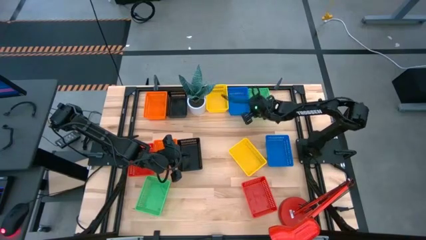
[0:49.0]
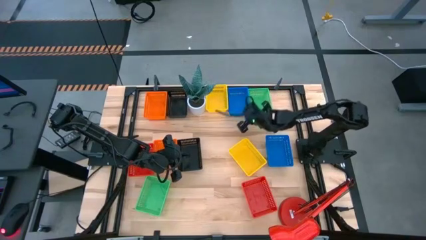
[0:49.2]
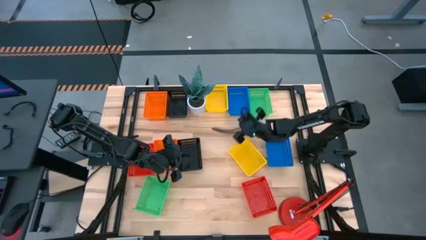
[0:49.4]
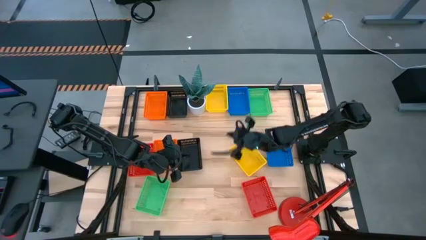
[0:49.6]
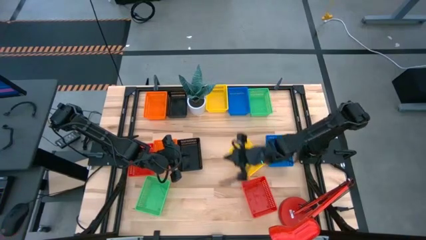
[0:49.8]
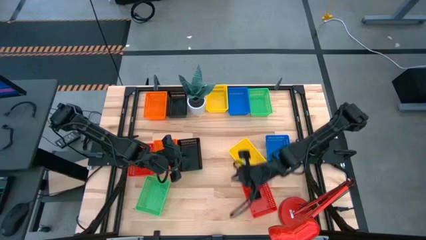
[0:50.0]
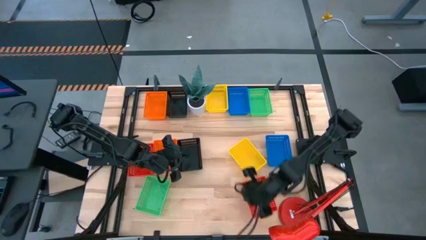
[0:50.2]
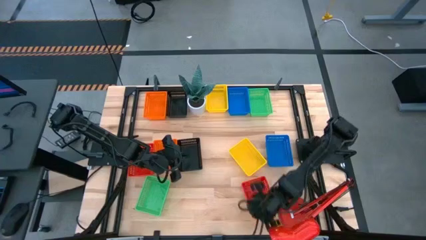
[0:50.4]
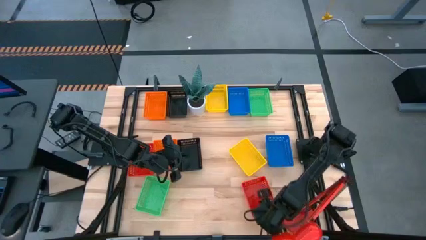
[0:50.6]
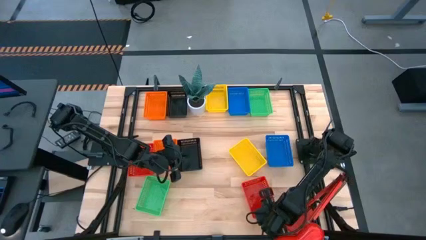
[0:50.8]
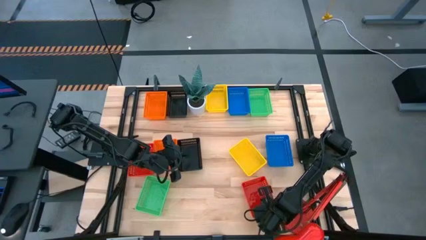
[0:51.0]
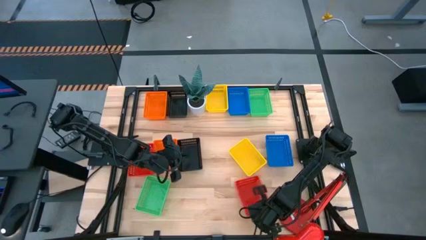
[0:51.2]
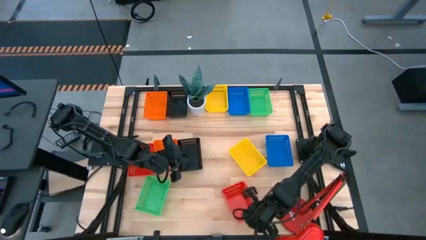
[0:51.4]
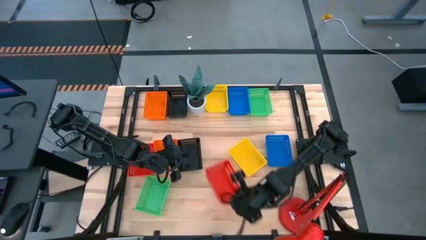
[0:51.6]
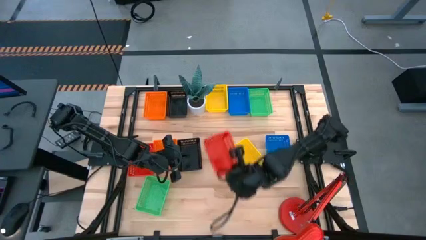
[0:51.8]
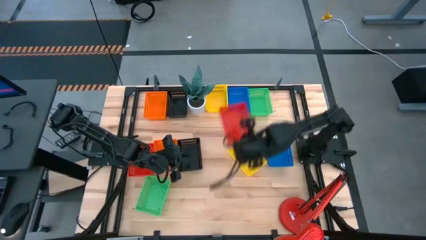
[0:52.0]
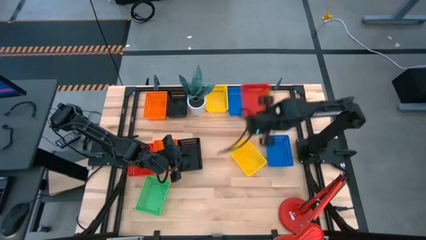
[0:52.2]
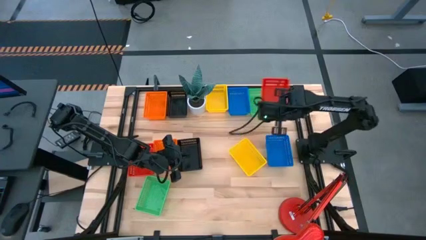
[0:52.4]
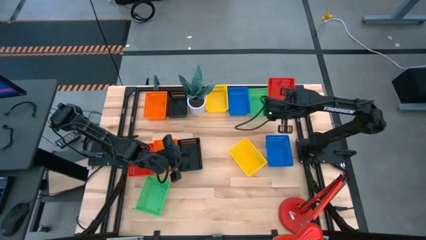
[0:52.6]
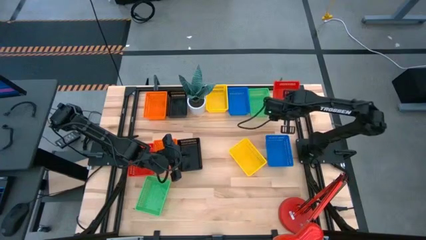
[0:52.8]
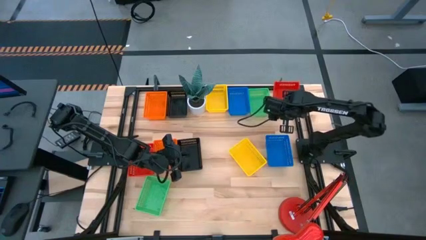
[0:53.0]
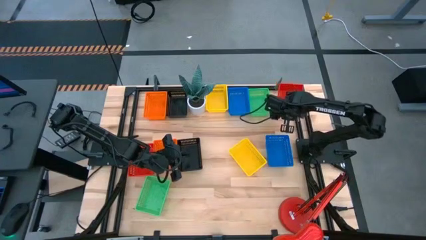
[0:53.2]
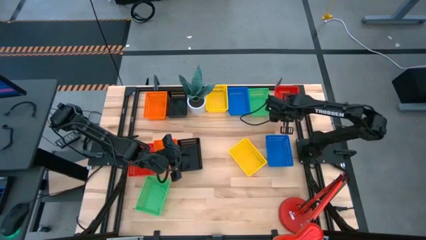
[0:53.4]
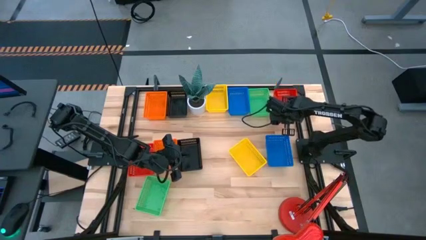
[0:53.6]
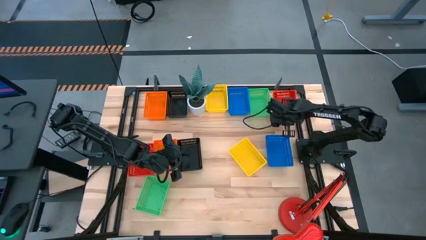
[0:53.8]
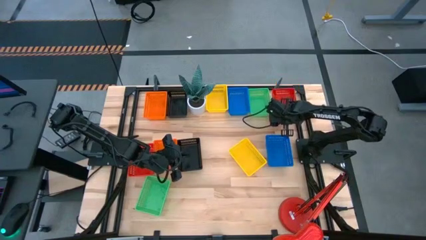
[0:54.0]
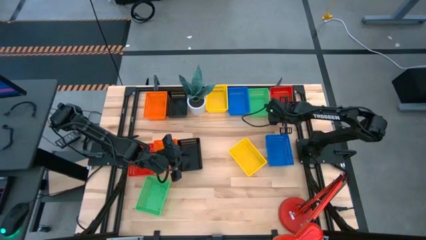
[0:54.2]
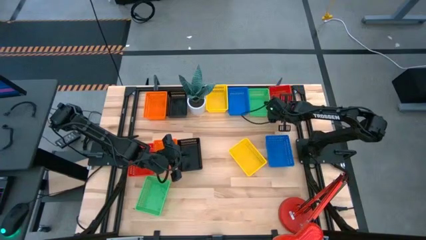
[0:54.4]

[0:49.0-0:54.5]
Move the bottom red bin to the top right of the table

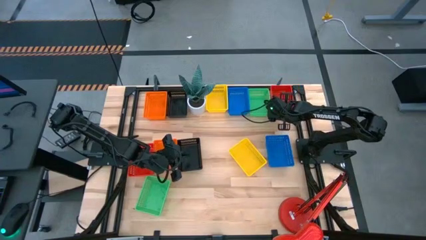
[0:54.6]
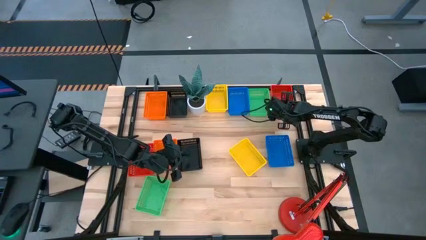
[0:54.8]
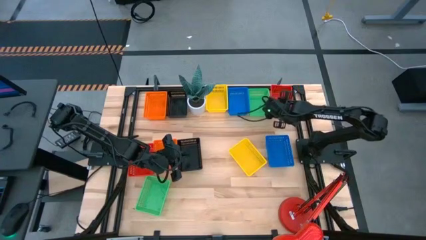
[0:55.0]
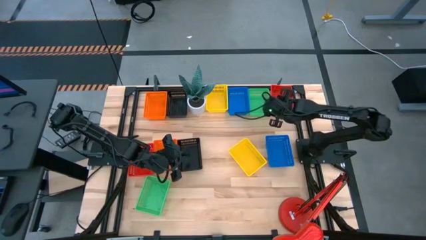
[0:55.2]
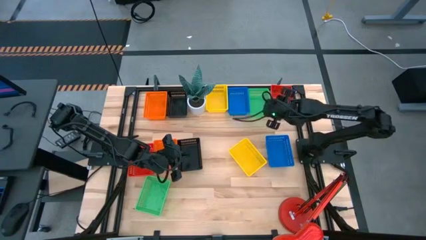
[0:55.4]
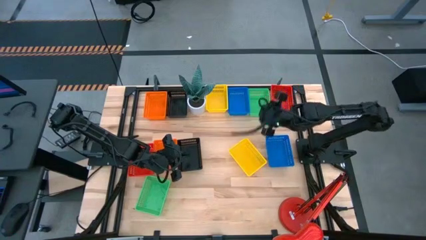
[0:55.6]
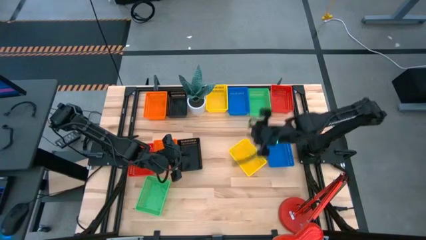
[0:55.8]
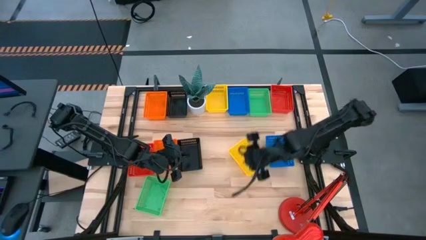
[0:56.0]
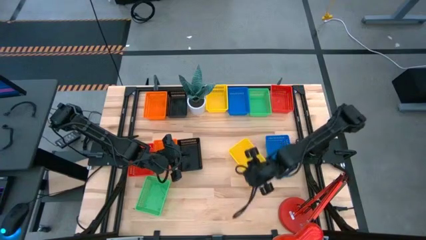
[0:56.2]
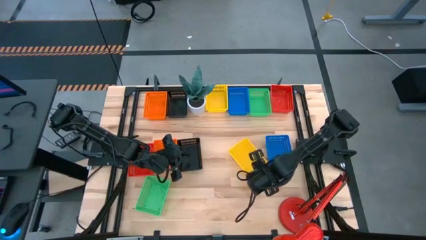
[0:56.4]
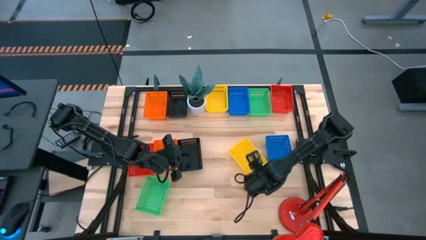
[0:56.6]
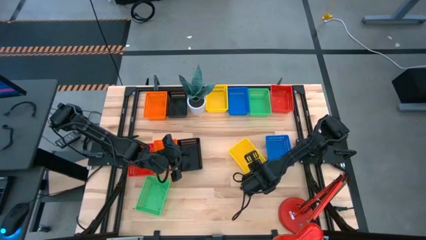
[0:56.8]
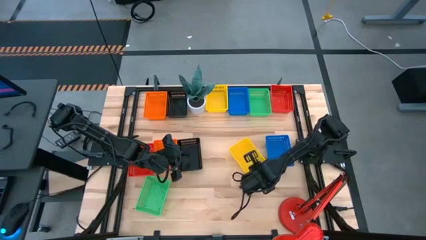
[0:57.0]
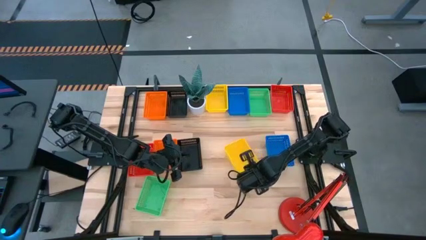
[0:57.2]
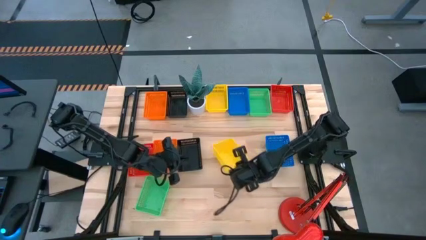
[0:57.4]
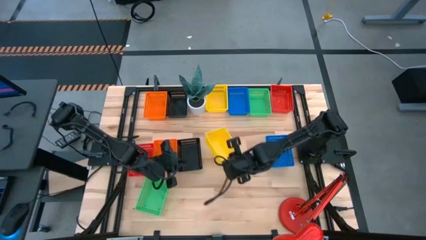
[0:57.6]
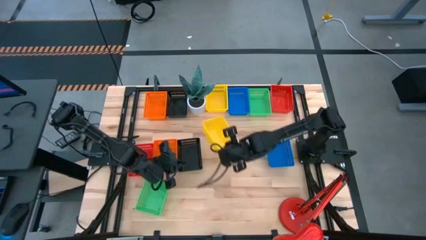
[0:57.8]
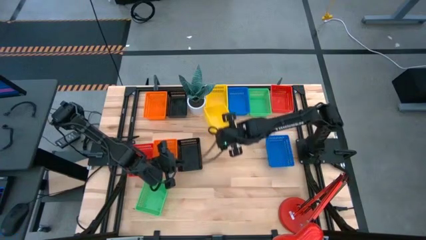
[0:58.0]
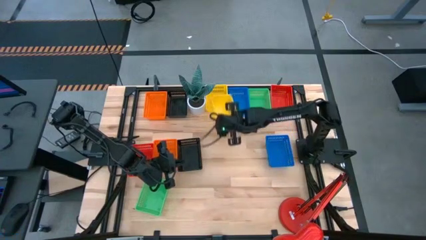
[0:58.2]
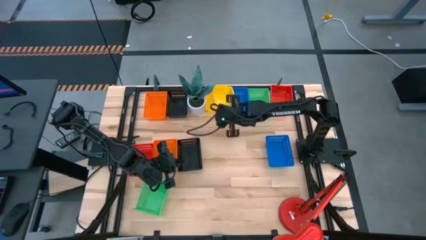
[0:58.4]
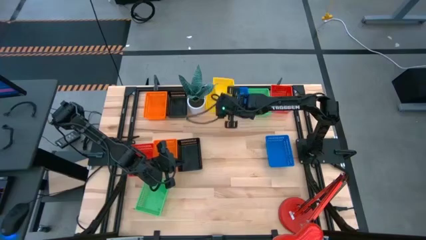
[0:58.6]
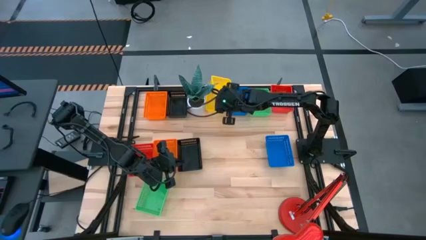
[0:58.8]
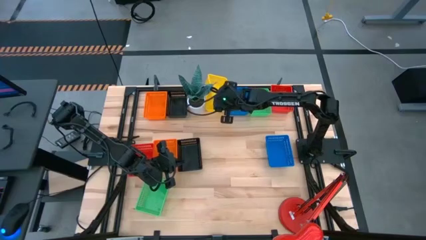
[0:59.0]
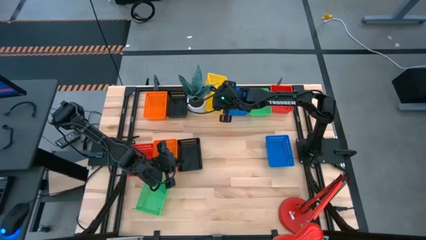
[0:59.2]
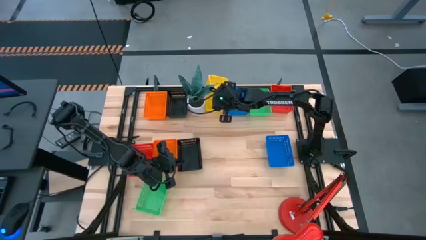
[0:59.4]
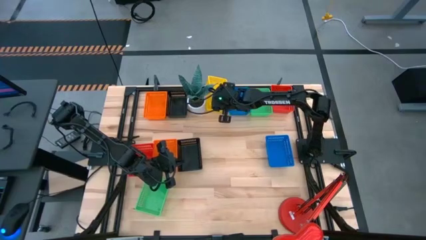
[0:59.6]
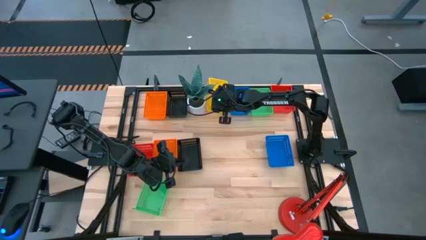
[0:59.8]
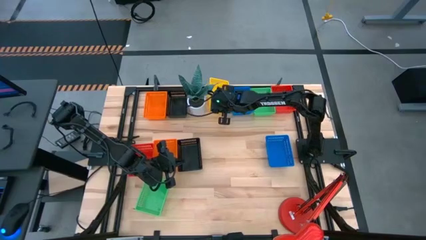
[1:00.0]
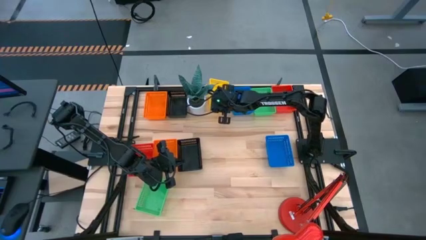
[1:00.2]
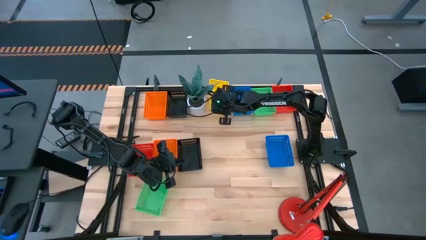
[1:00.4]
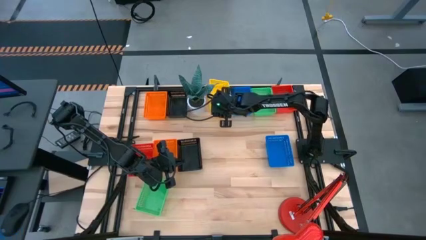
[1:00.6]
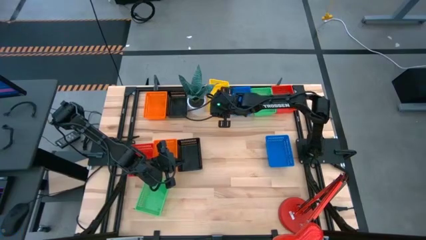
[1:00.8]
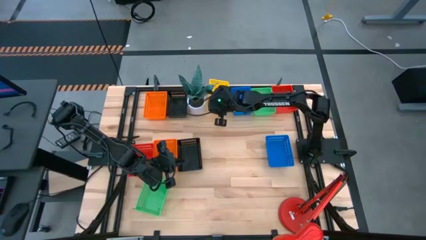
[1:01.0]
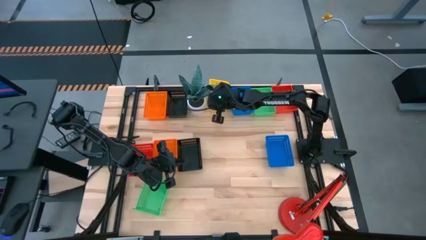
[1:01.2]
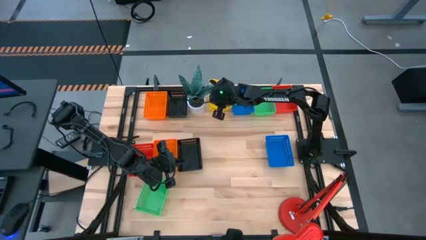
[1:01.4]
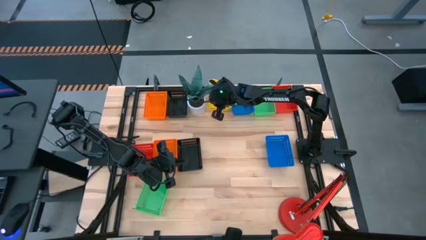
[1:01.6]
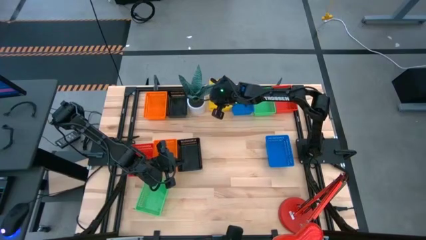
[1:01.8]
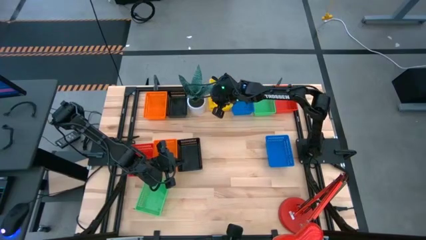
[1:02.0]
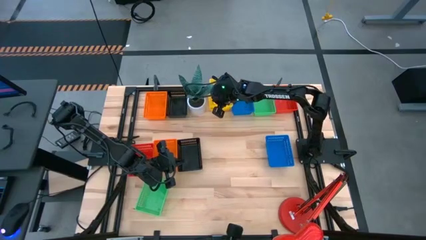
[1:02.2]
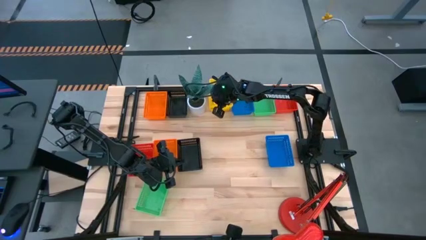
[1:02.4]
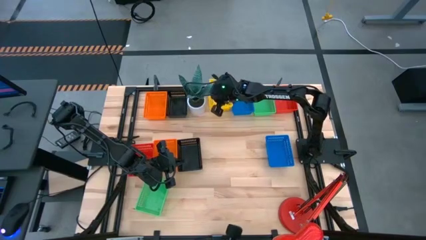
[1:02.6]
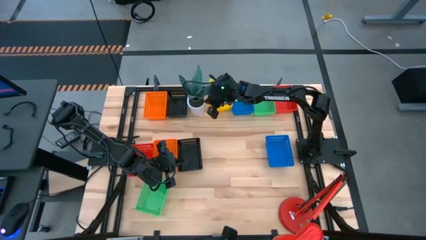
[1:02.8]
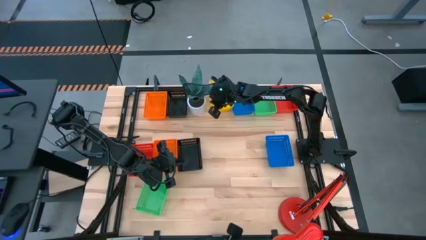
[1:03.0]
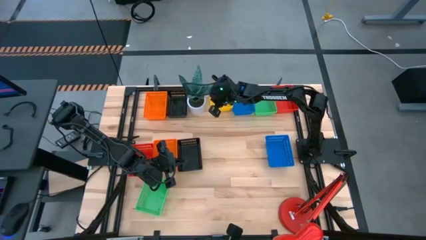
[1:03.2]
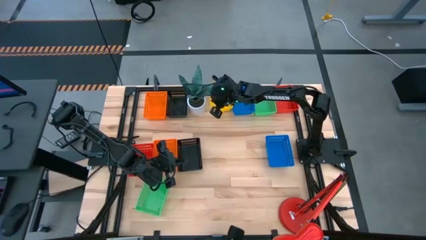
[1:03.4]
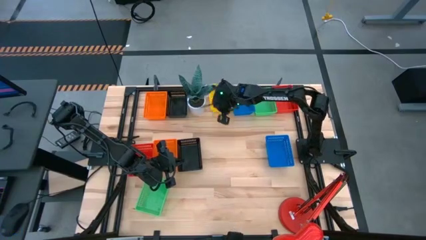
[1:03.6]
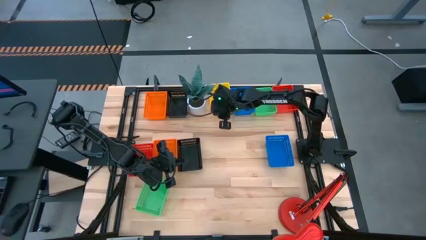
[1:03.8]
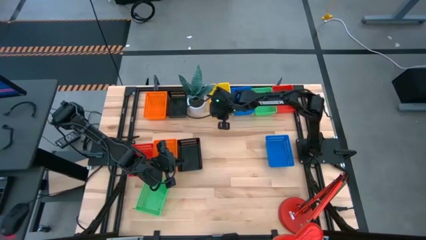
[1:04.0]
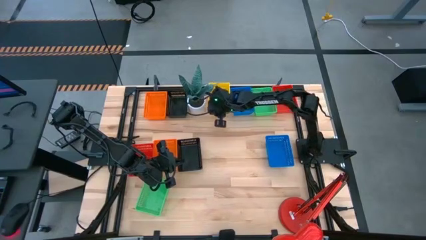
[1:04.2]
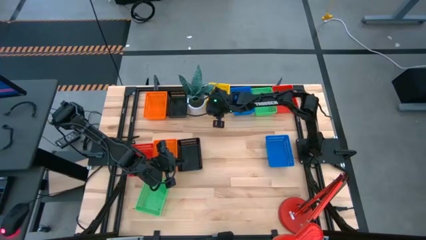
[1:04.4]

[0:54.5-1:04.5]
Stack the bottom yellow bin on the top yellow bin
